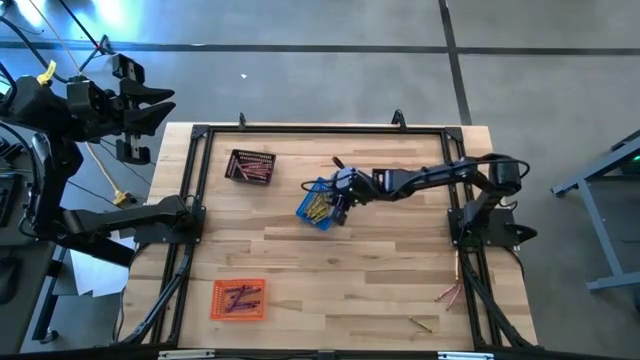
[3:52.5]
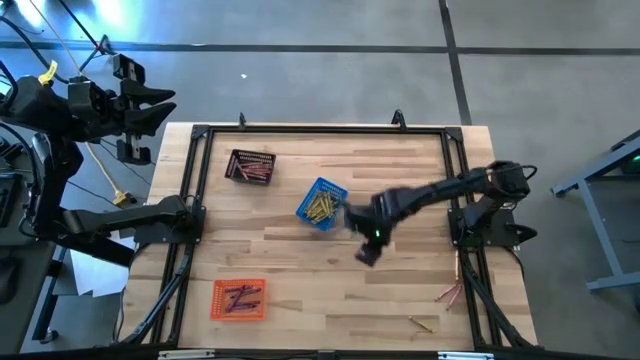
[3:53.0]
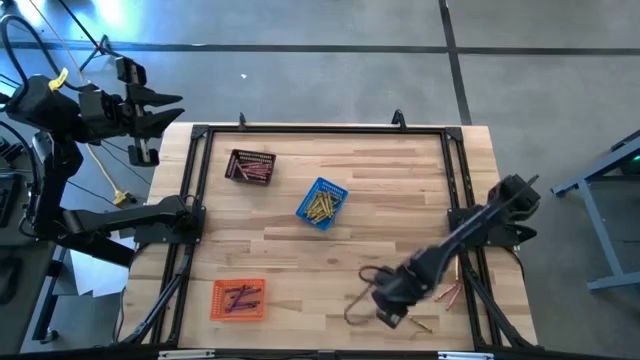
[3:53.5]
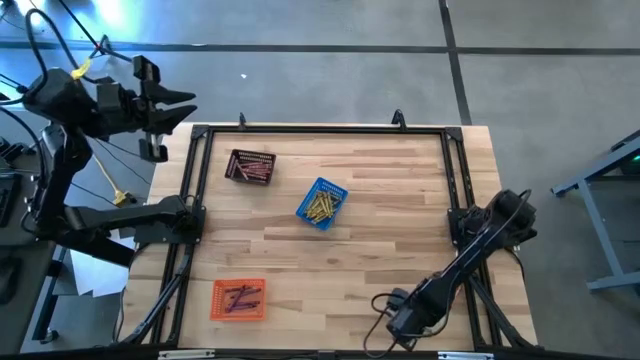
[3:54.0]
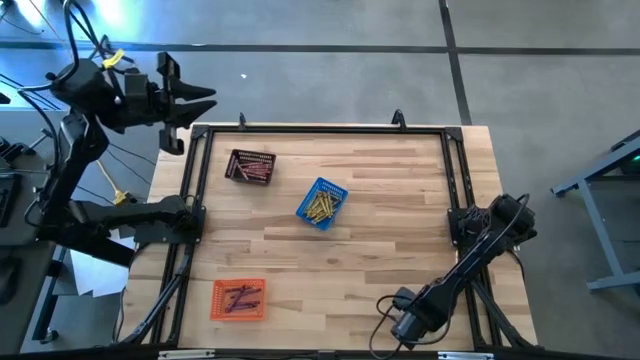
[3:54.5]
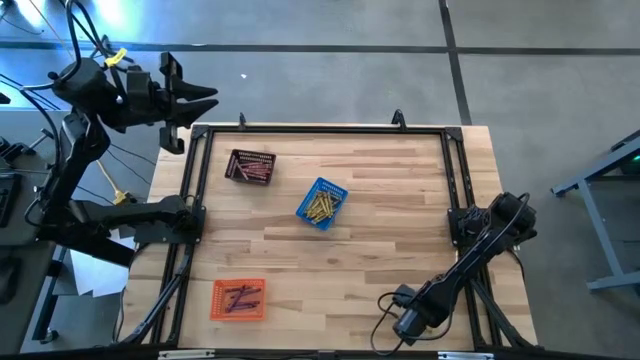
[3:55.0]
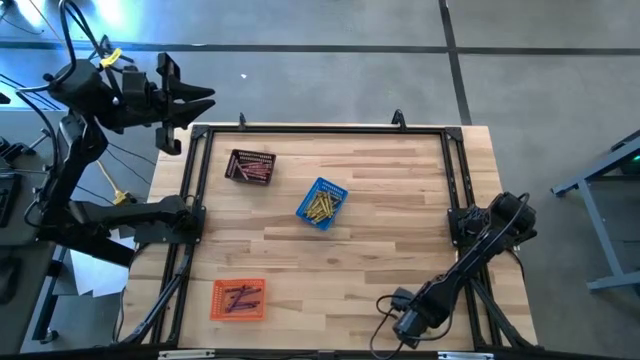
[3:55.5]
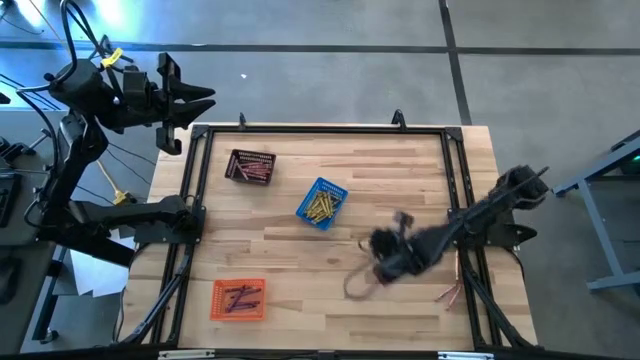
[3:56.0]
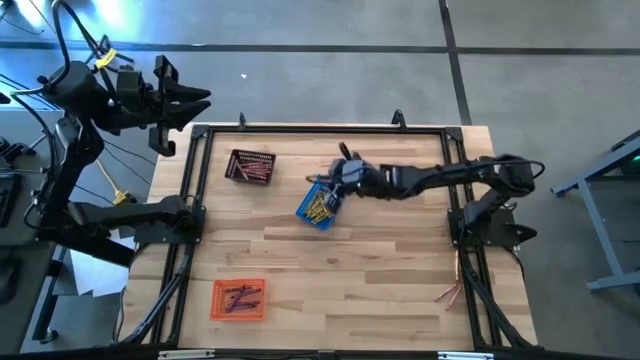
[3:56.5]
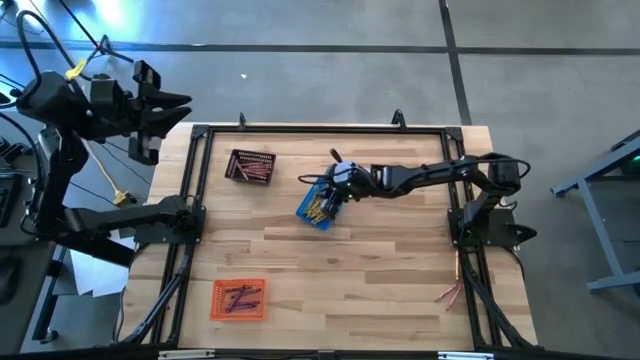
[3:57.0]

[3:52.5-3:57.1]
Task: Sort crayons
Put the yellow crayon into the blue basket

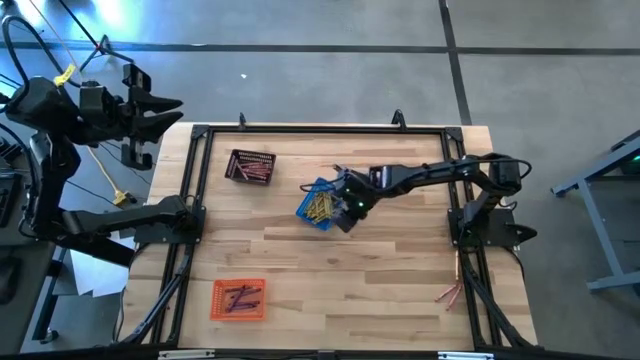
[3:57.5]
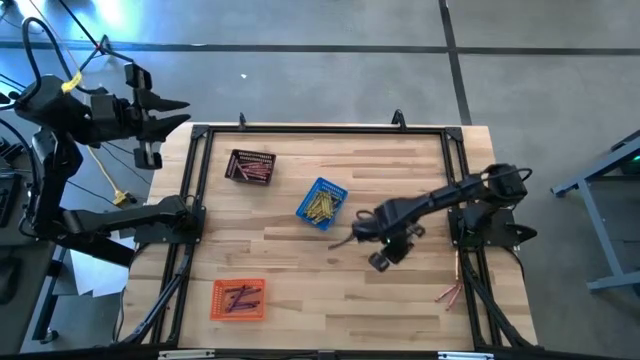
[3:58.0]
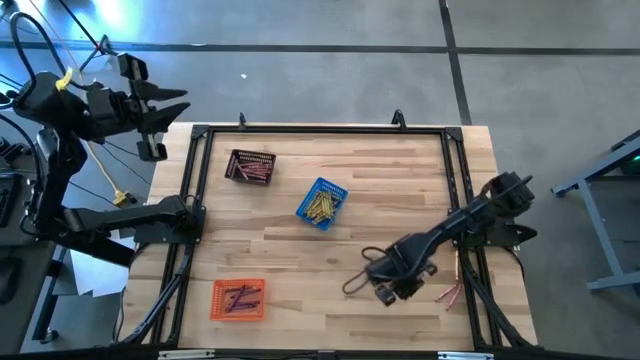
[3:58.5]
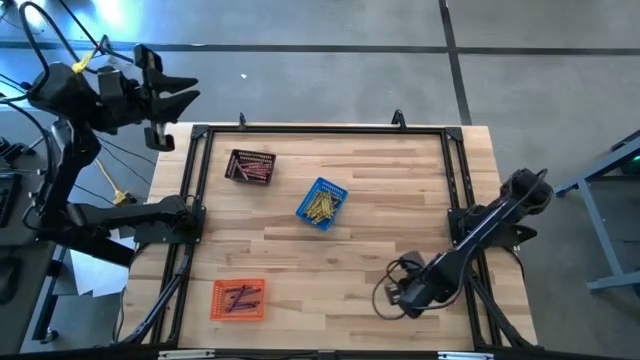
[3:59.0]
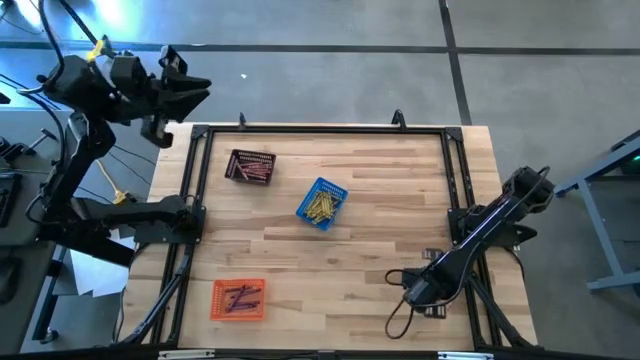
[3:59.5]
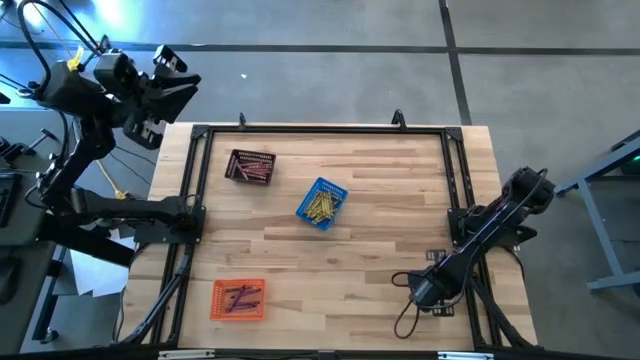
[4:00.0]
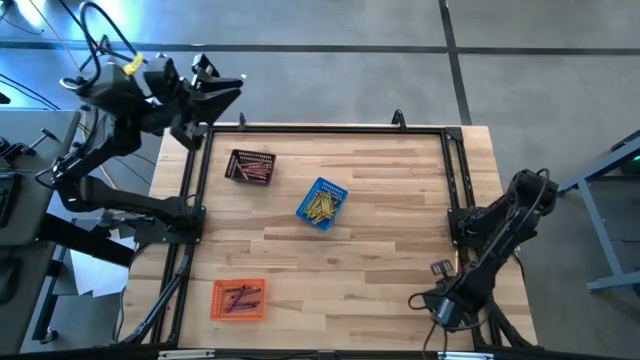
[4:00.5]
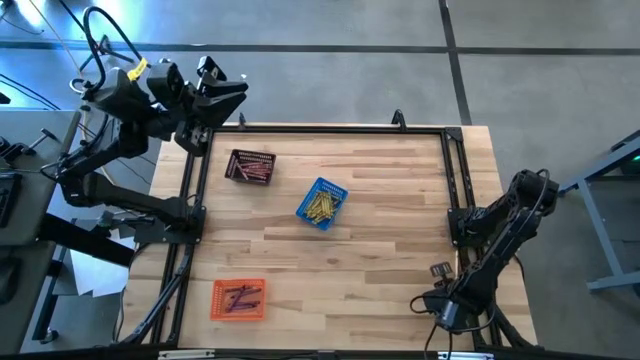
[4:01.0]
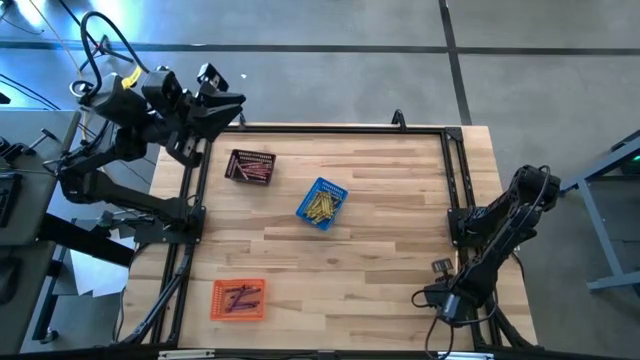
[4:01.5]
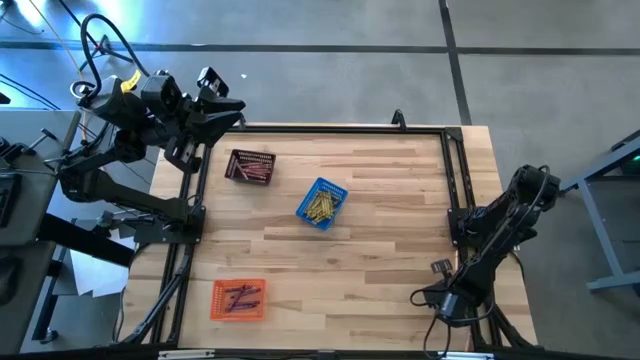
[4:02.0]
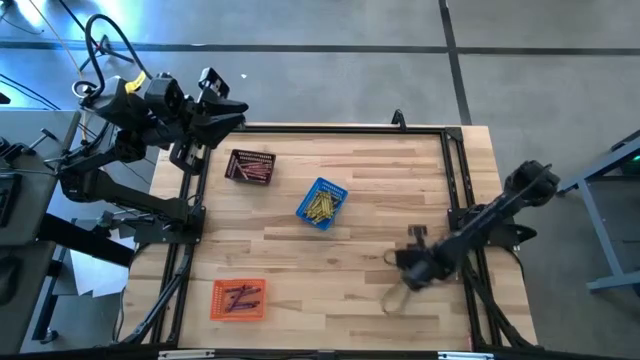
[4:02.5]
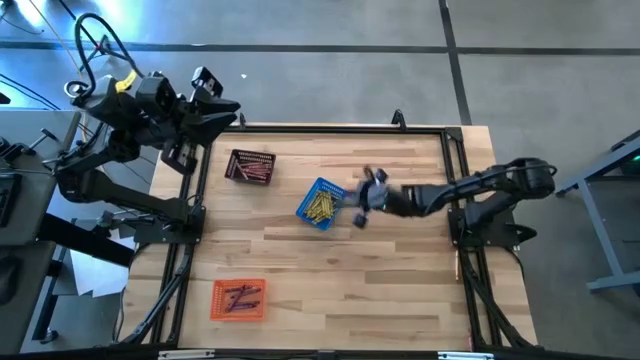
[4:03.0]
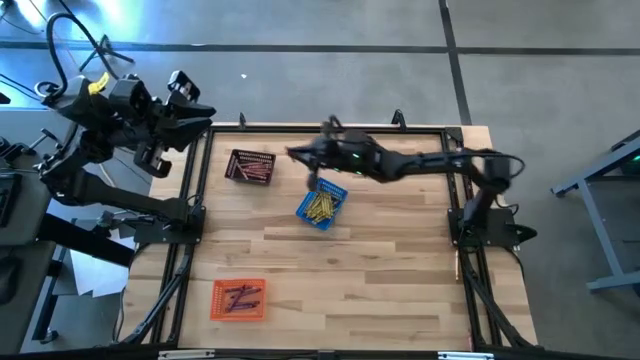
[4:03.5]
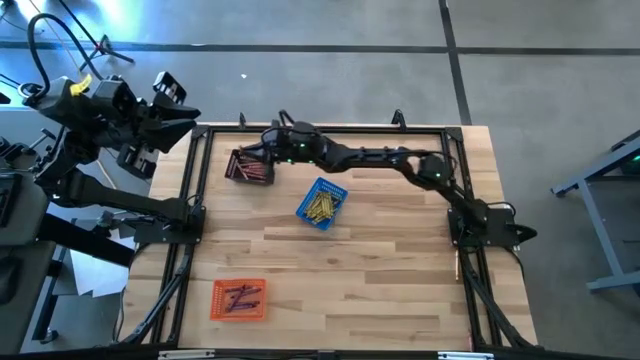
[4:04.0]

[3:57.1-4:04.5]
Put the red crayon into the black basket

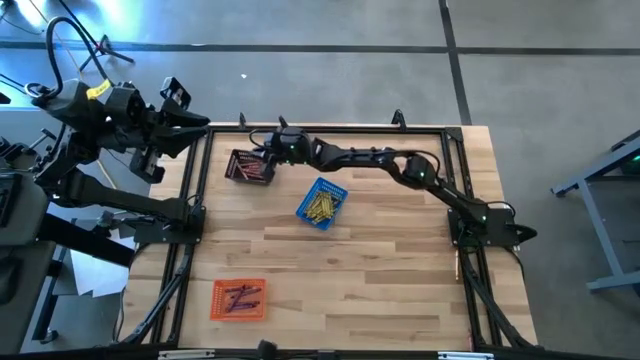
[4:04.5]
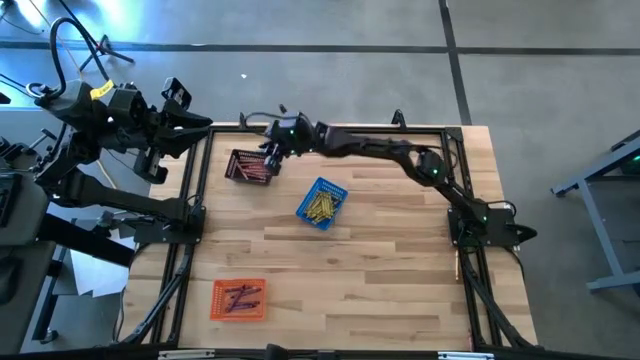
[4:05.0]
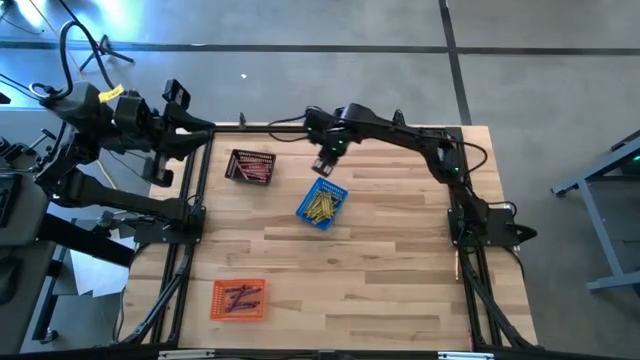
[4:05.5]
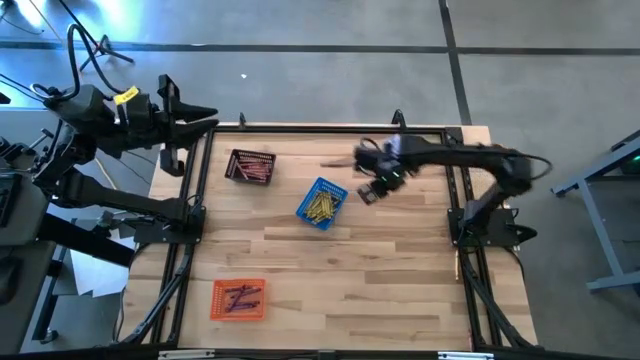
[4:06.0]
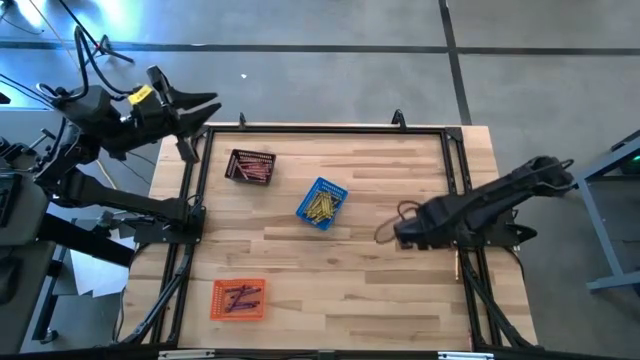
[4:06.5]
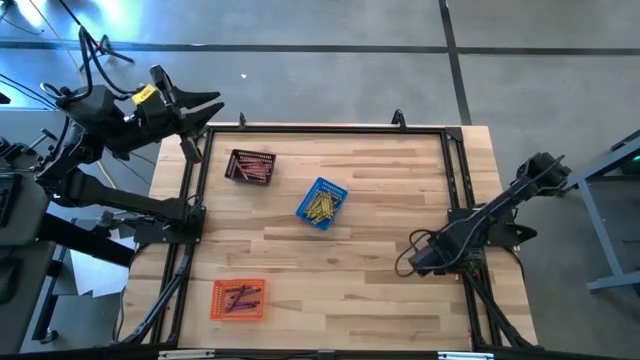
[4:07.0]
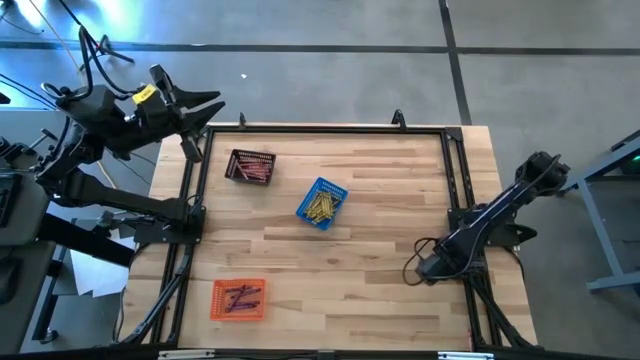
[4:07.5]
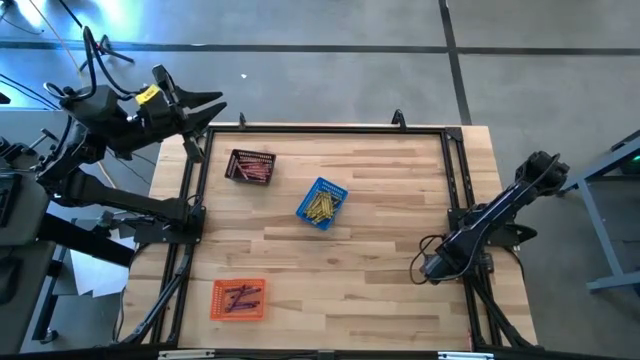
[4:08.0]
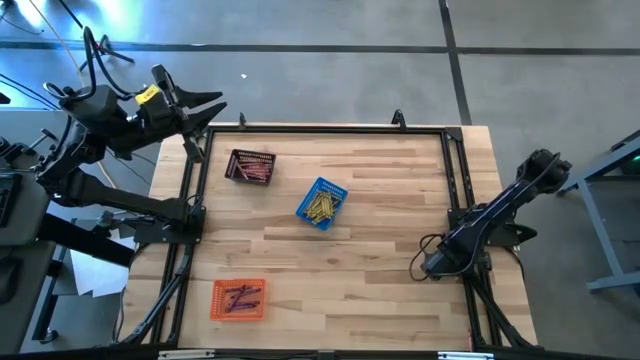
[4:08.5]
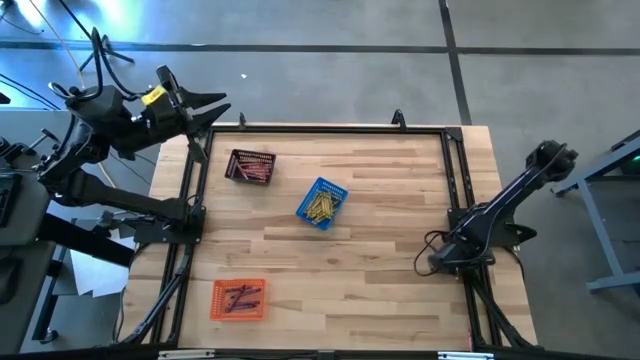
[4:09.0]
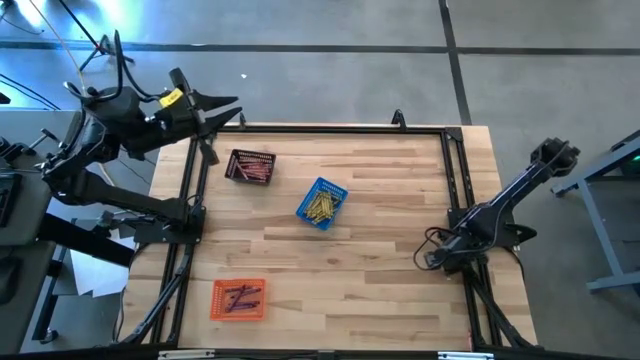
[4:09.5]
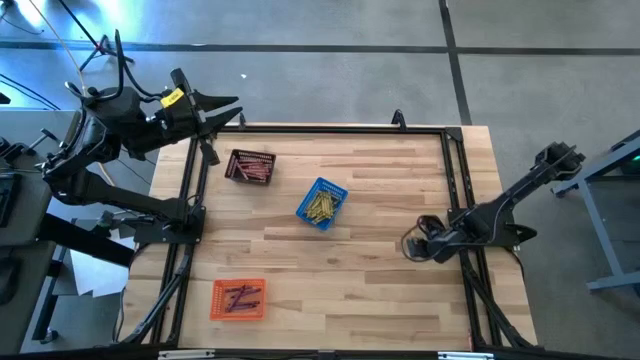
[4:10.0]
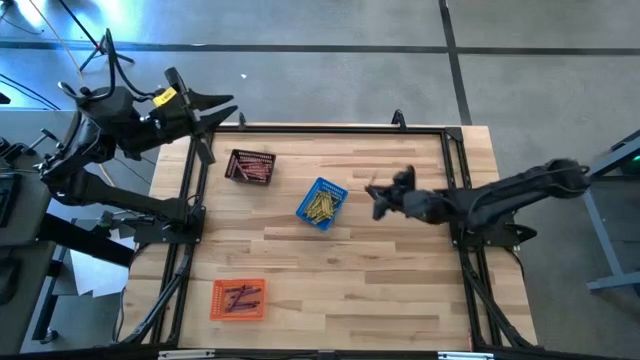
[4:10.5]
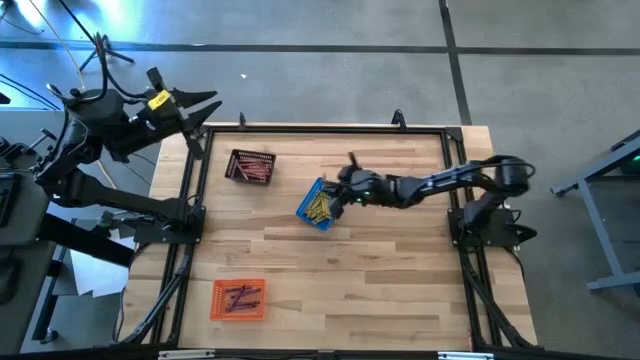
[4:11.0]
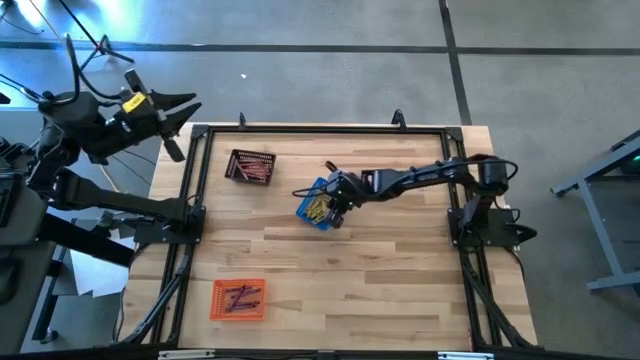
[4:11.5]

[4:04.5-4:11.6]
Put the yellow crayon into the blue basket

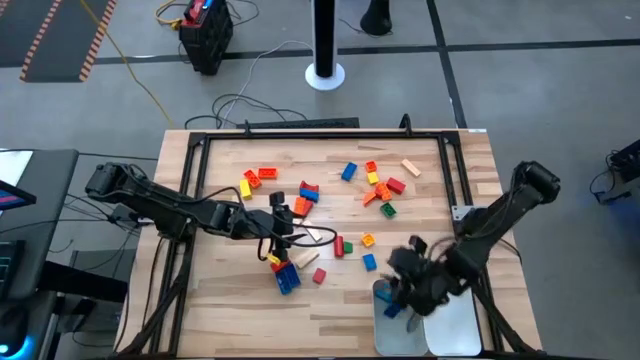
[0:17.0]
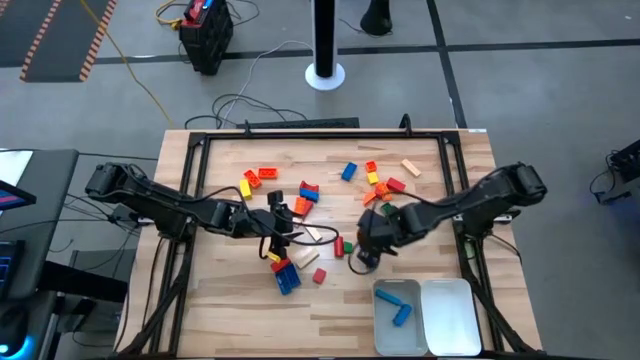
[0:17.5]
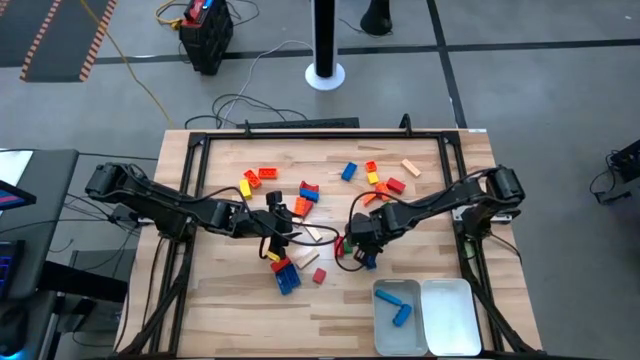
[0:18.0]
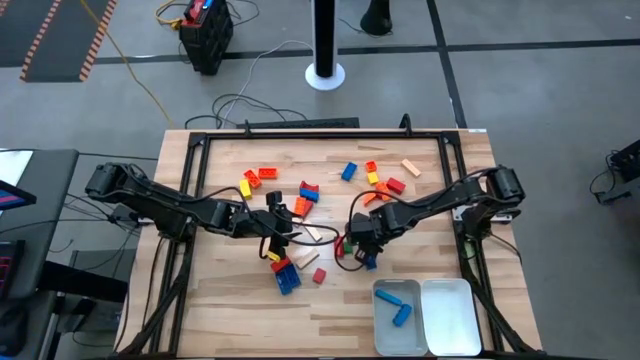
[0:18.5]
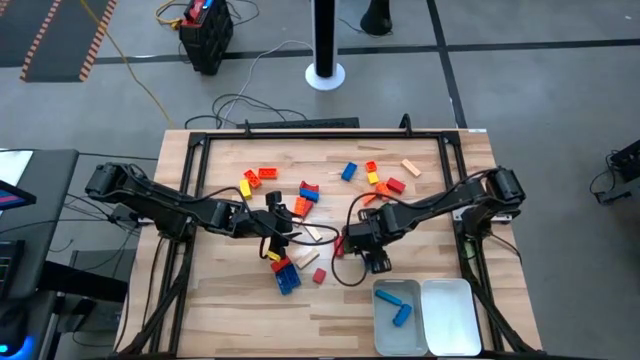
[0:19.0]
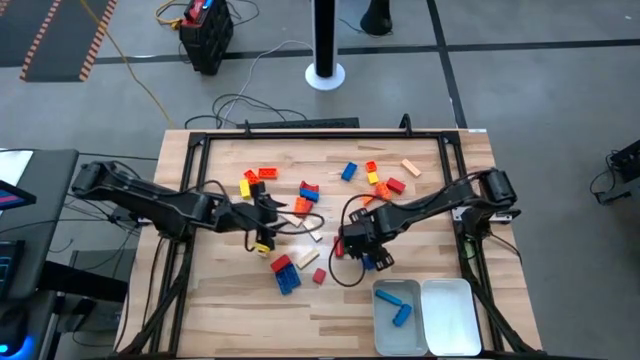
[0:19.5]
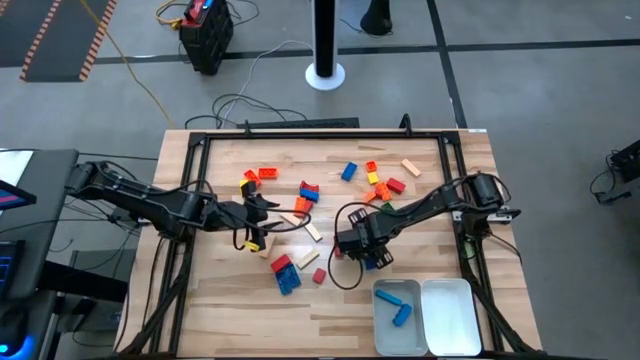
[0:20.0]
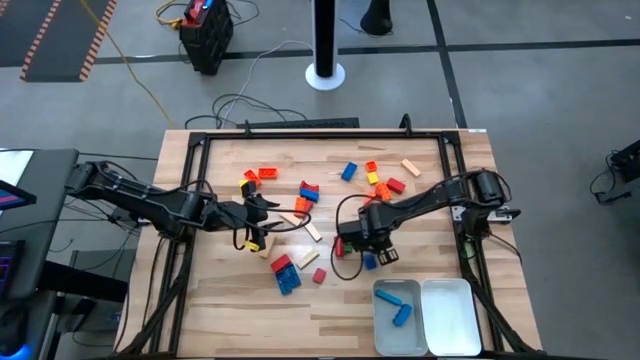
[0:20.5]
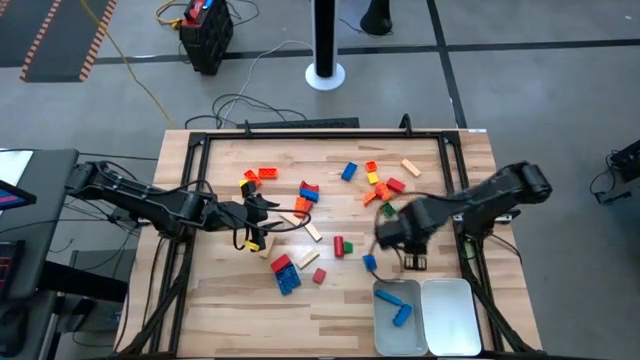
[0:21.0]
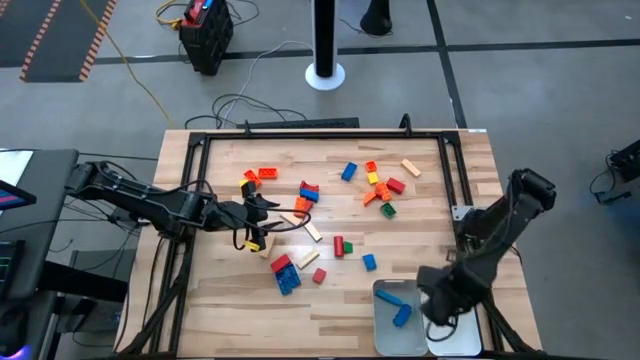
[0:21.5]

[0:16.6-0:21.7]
Task: Sort blocks by size
Put the small yellow game piece into the white bin
